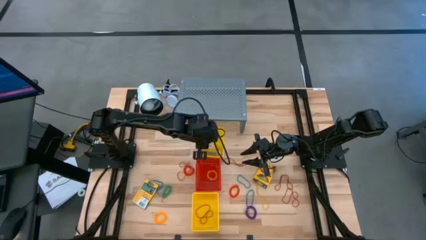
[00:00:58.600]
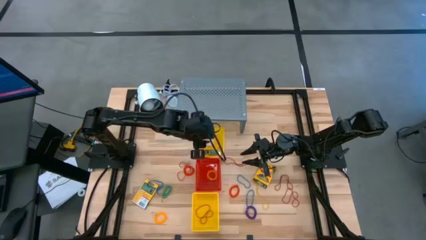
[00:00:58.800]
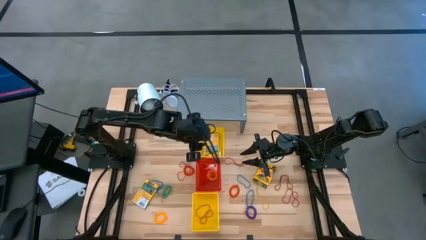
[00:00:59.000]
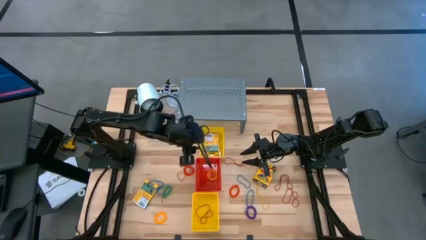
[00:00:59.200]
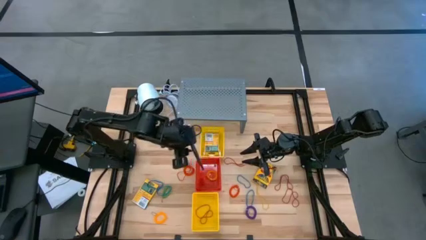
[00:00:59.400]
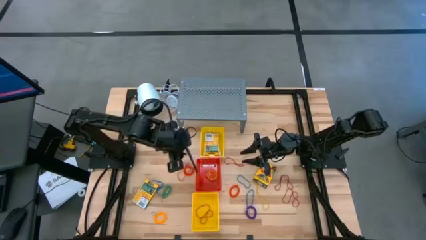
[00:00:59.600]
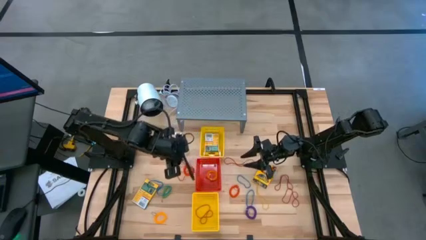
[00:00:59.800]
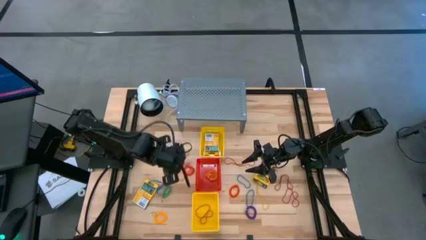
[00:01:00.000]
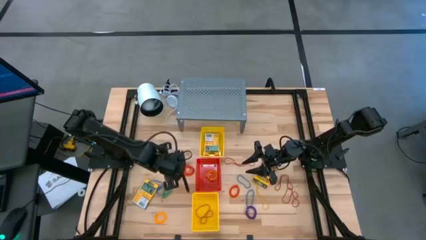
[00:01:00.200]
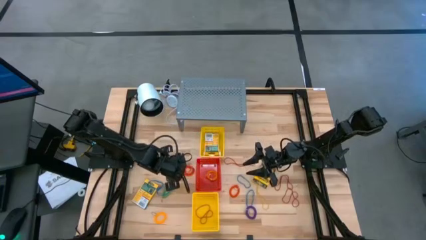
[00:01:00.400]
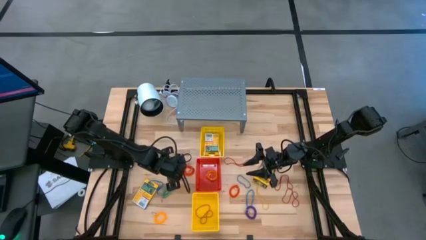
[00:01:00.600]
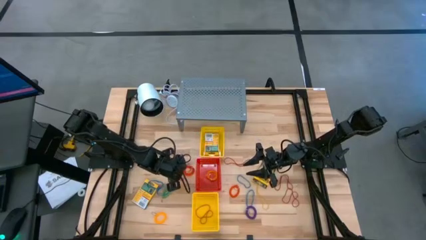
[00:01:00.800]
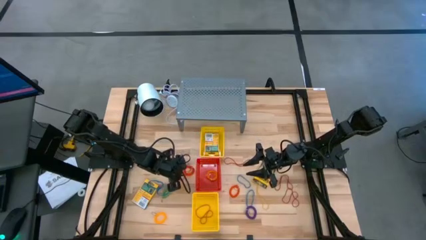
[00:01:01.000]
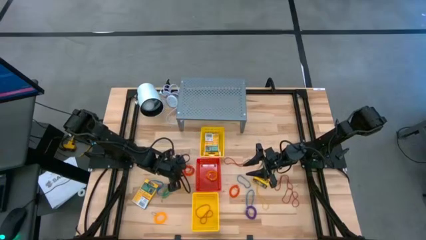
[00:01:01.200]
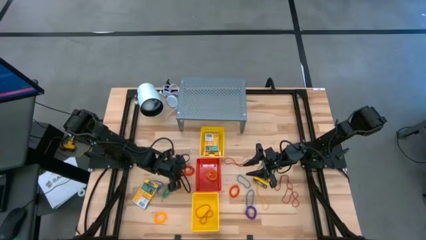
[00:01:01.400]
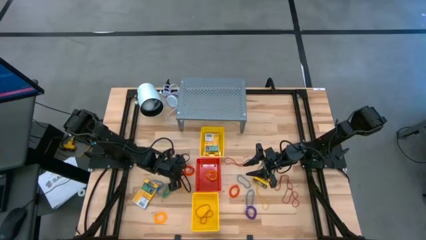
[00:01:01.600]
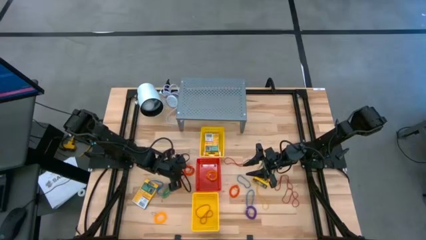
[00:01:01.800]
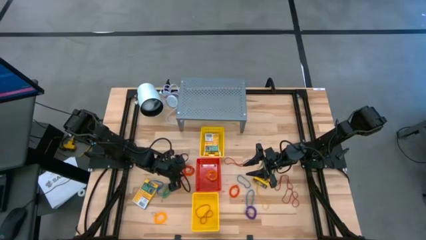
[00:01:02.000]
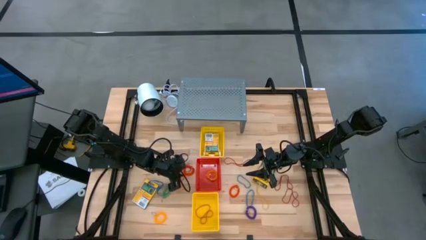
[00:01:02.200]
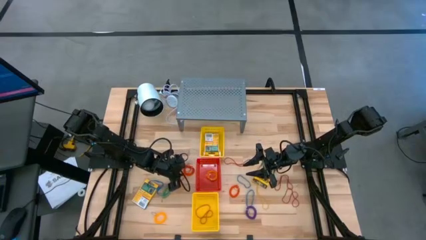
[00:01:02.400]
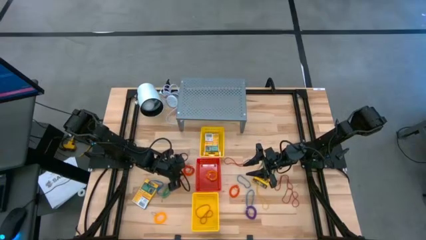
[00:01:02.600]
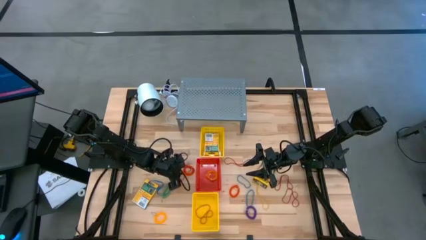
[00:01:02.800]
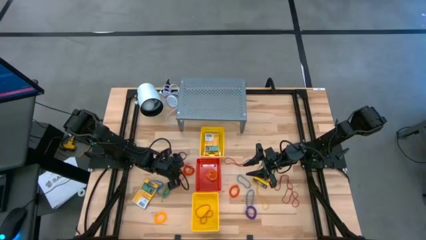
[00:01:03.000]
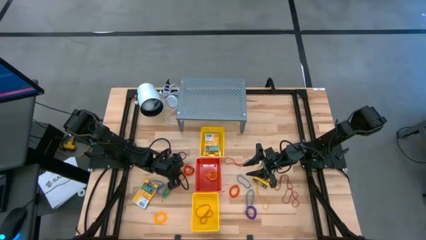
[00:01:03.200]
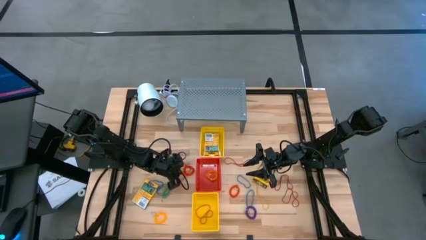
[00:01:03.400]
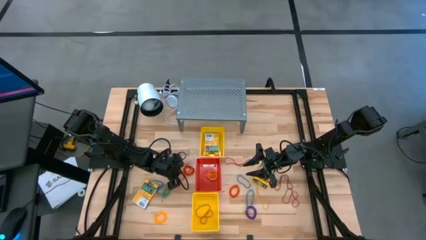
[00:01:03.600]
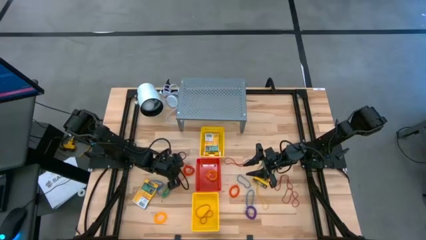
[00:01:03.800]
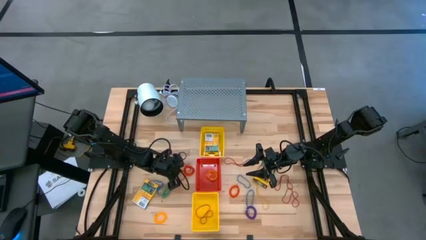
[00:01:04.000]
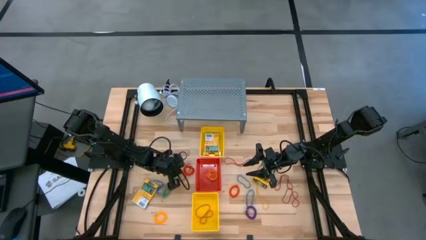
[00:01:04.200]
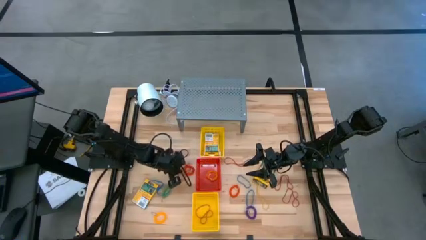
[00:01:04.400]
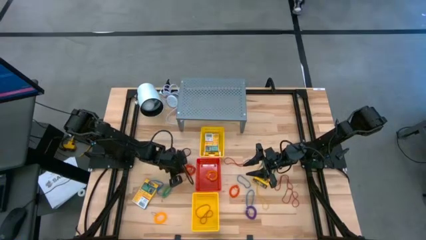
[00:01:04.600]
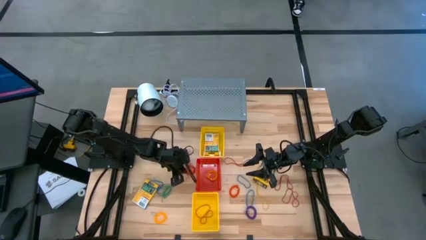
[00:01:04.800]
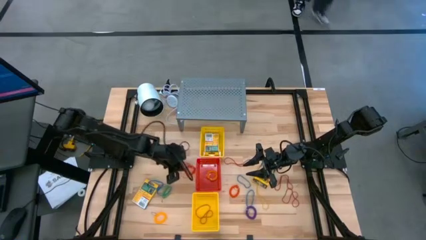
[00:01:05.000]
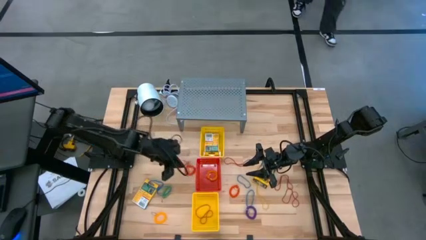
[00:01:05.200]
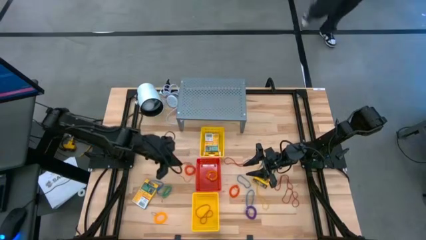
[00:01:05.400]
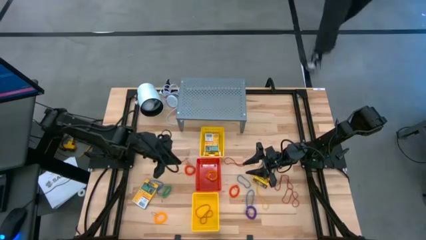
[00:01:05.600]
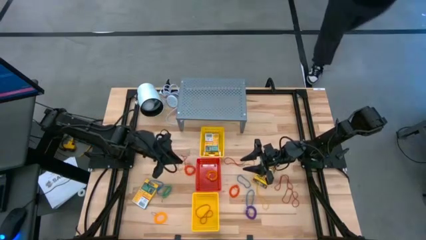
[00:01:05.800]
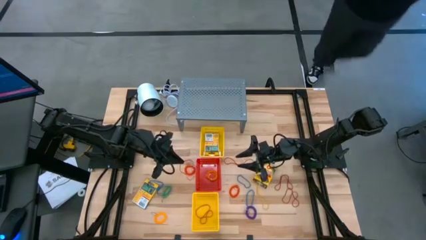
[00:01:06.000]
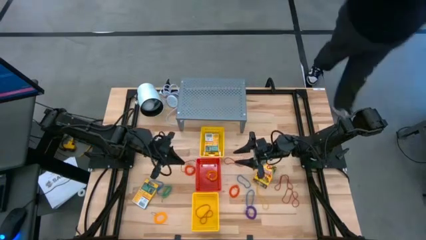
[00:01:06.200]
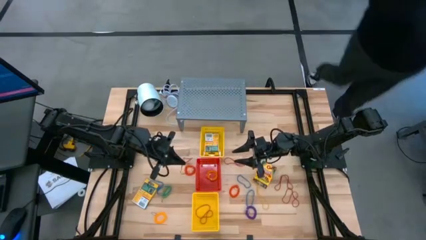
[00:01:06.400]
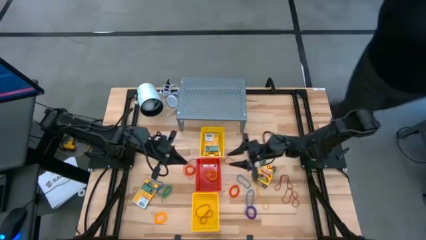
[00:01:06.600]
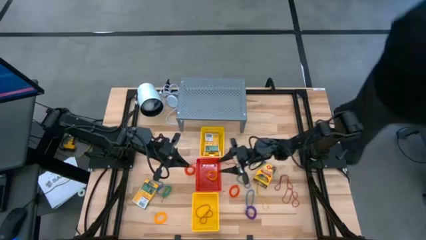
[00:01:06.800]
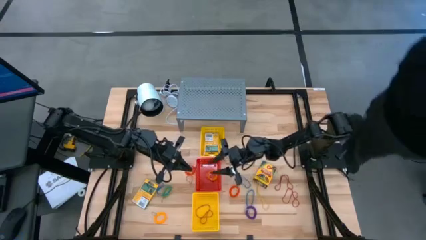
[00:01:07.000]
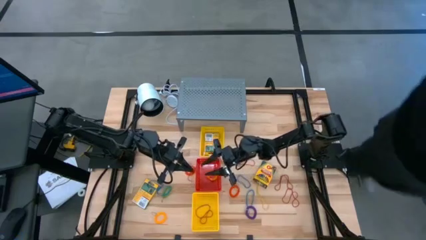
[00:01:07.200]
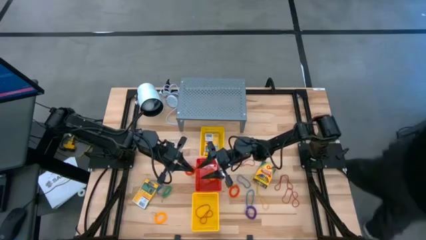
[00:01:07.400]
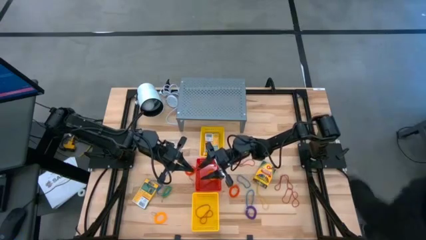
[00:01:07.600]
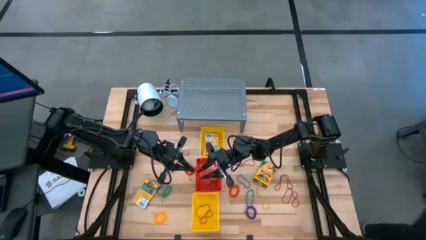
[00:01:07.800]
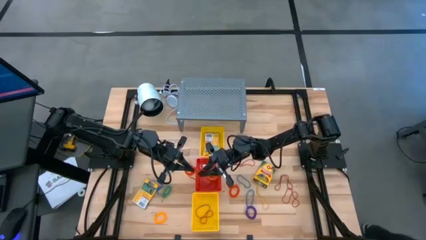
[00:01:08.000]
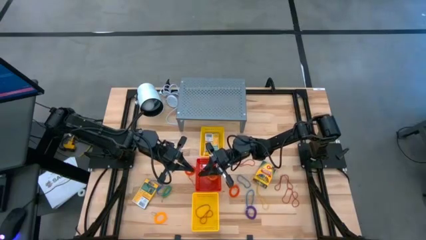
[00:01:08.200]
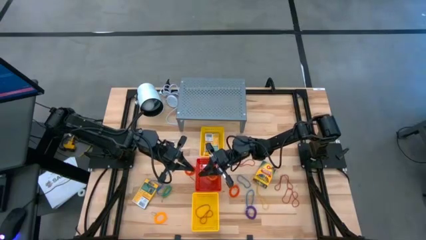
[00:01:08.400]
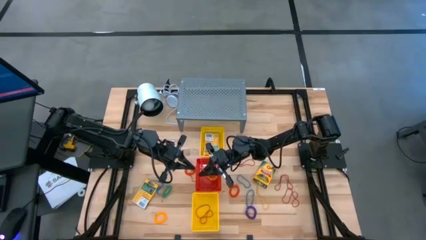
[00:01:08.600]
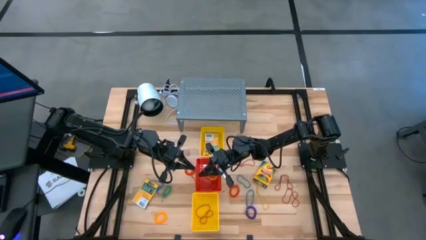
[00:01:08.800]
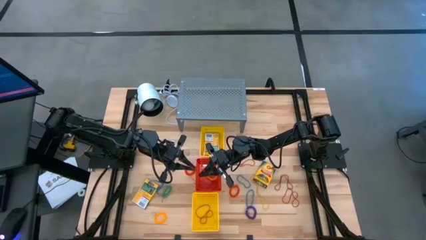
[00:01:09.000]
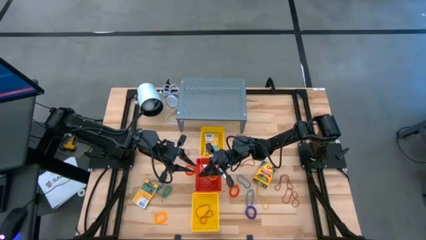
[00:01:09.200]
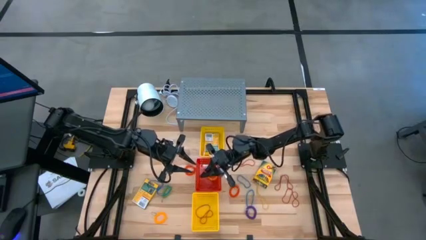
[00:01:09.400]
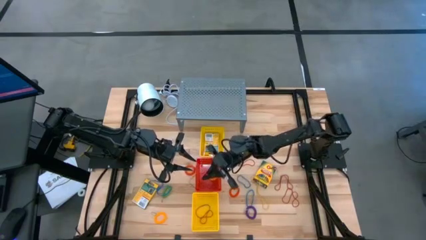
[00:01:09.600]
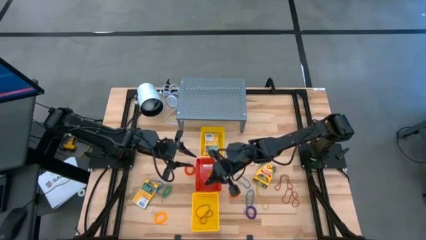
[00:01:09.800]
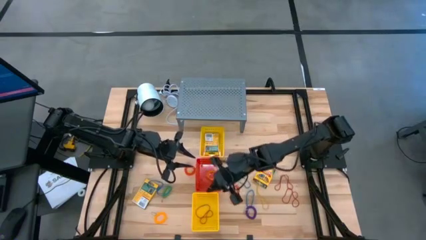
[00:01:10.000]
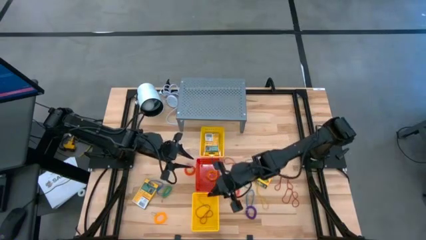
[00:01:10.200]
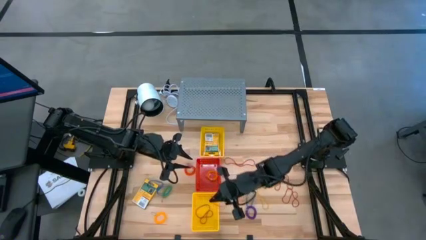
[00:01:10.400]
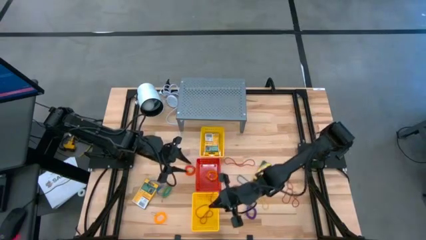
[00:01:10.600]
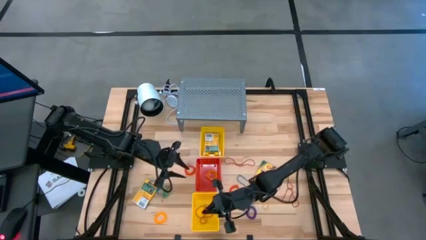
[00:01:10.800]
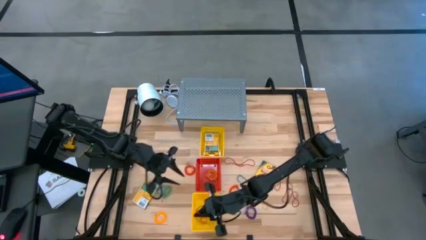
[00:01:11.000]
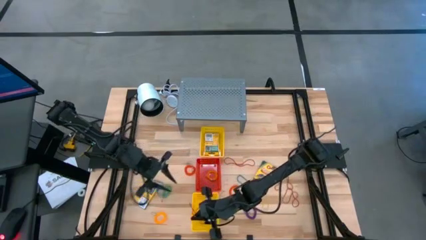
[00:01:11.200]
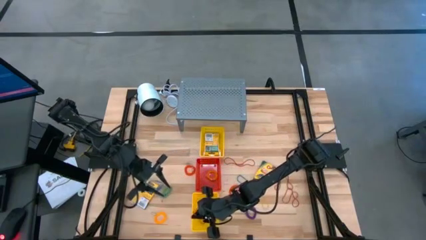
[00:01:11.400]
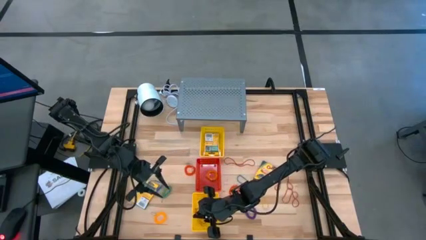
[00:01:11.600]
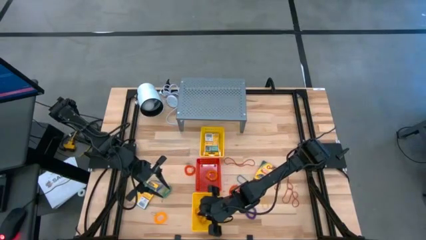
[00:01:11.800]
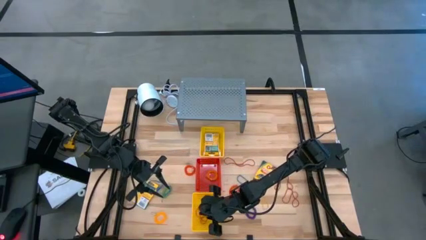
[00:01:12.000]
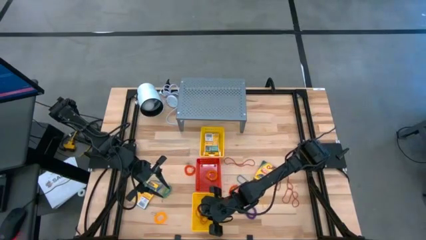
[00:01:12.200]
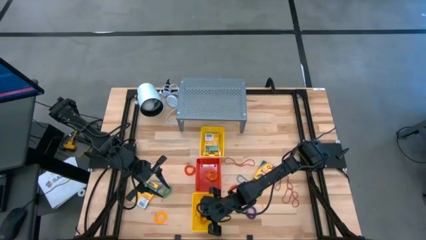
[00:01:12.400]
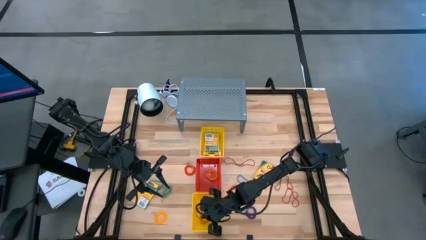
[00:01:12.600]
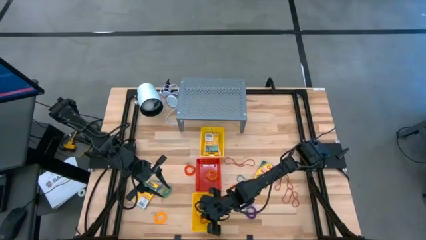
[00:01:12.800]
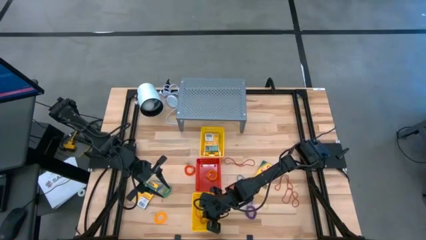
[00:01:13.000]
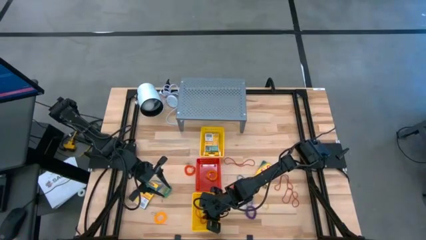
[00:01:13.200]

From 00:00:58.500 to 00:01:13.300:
Task: Pick & Place Office Desk Supplies
Put the red rubber band into the bottom yellow bin

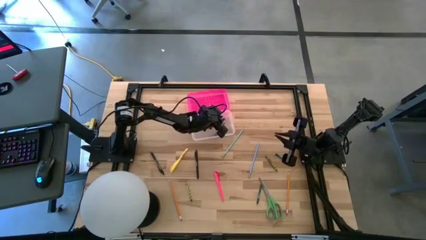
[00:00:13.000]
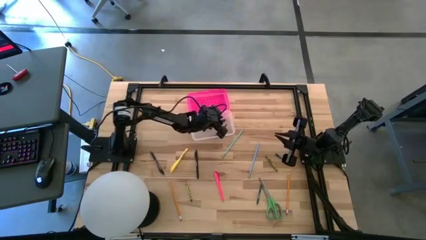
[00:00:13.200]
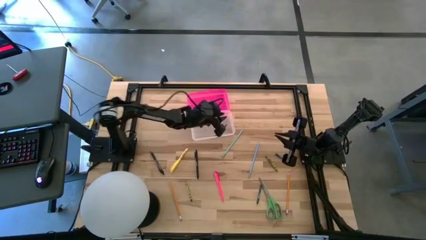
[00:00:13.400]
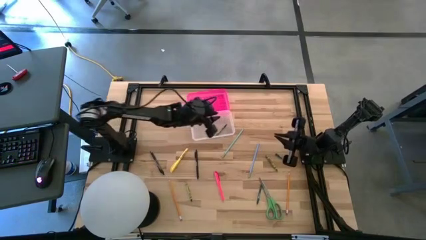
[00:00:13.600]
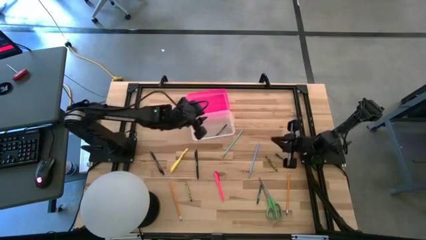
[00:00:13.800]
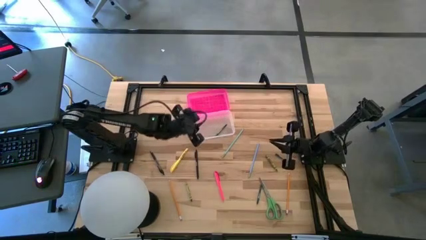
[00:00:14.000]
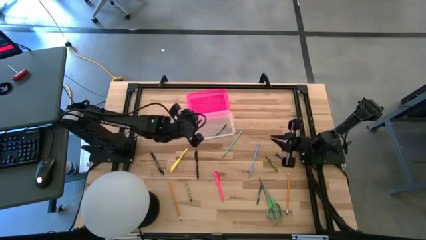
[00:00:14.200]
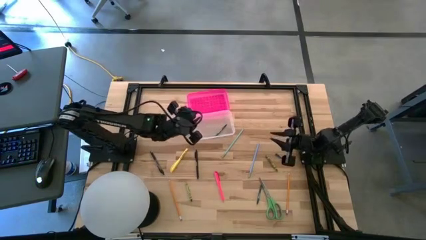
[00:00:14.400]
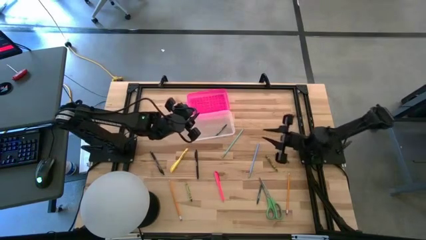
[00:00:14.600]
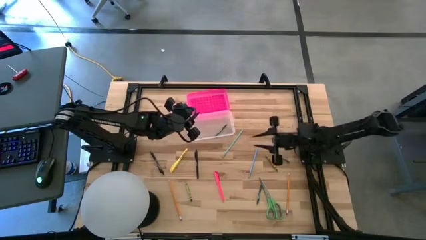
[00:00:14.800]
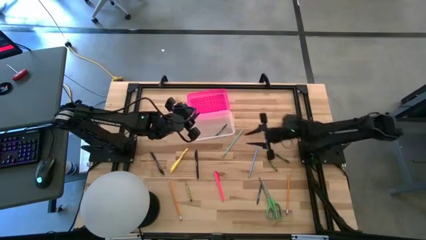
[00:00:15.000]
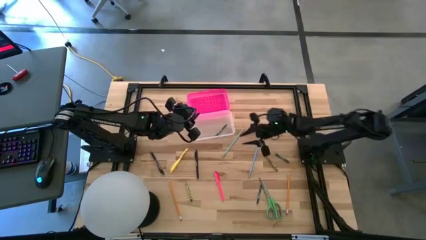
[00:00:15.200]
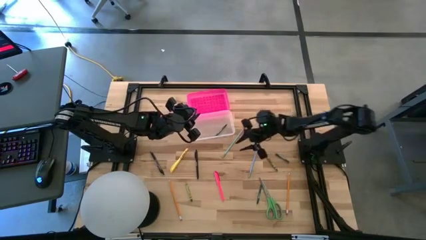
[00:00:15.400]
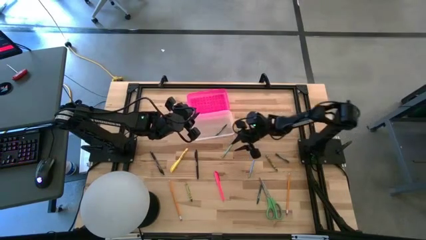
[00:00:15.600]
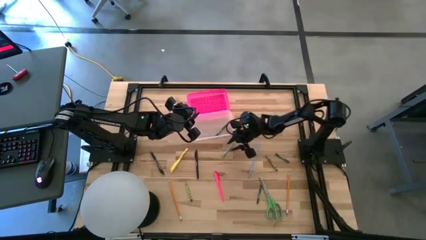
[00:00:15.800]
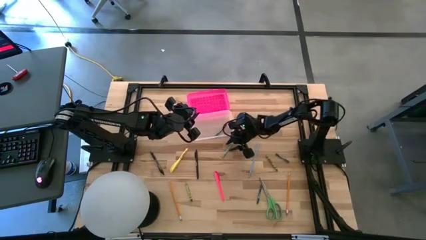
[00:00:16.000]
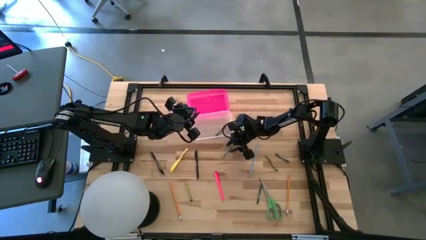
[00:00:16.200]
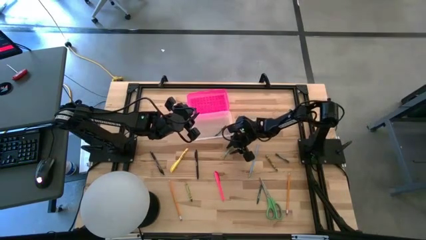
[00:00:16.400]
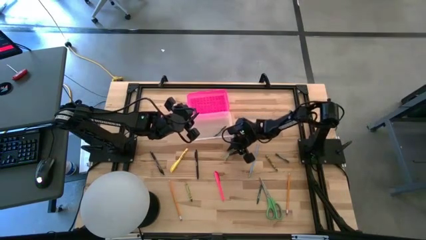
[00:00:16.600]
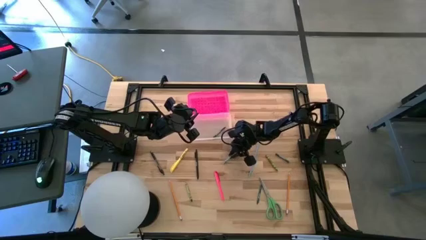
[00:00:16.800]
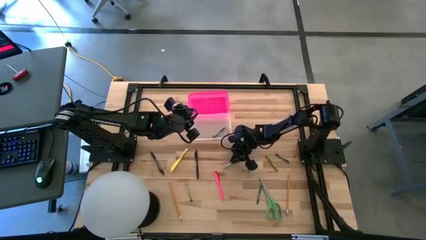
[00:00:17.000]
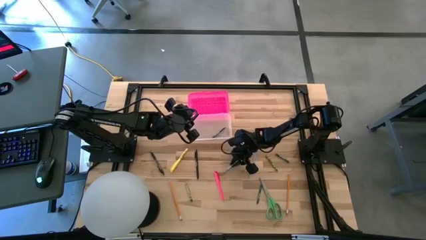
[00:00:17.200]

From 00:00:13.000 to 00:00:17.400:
Task: Pick & place school supplies into a supply box
Put the blue pencil into the pink supply box
